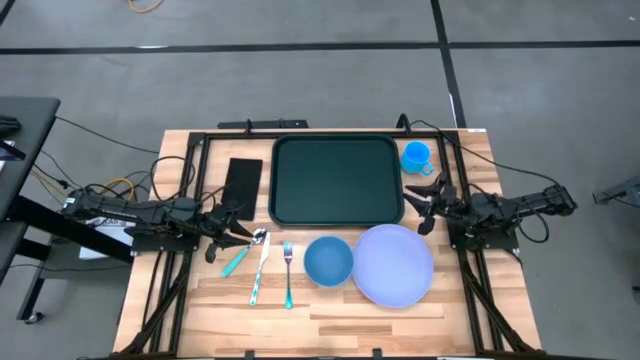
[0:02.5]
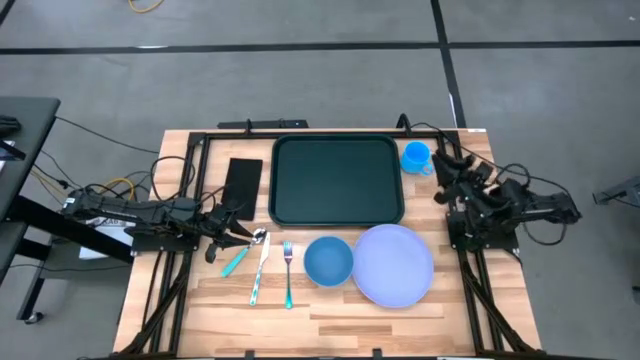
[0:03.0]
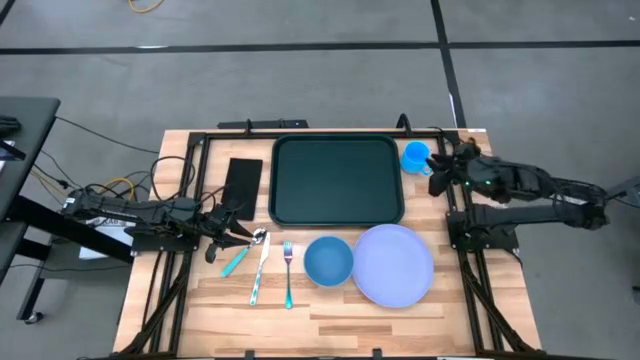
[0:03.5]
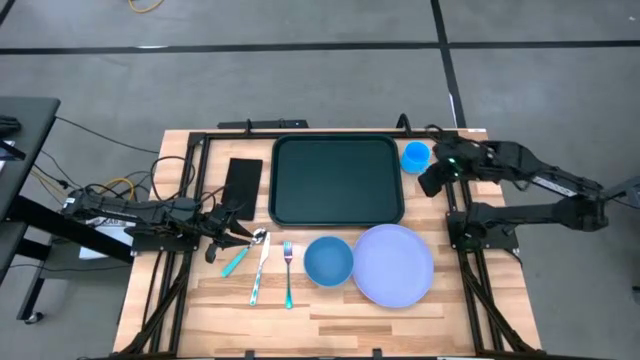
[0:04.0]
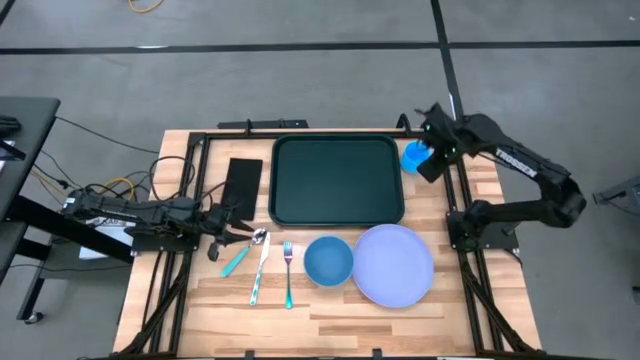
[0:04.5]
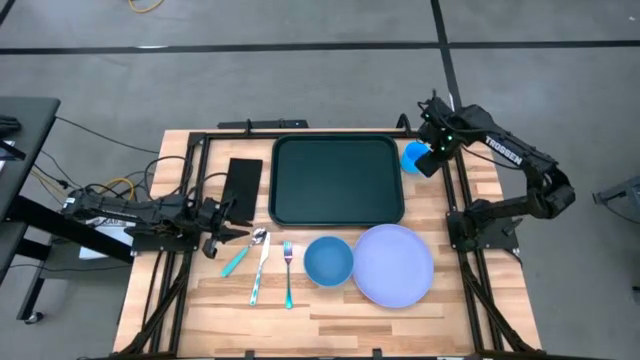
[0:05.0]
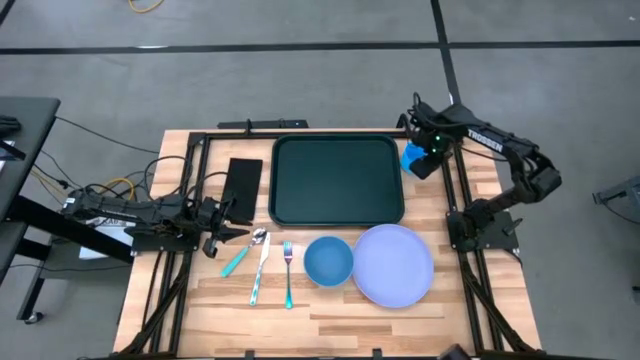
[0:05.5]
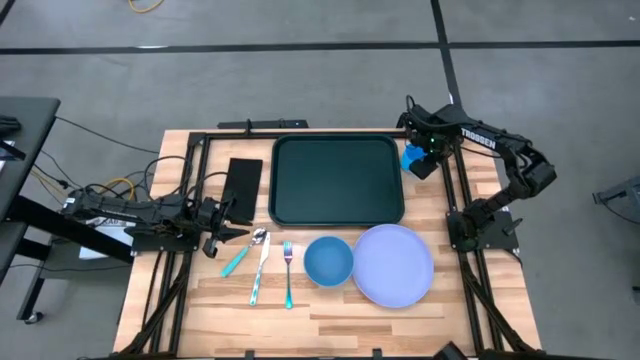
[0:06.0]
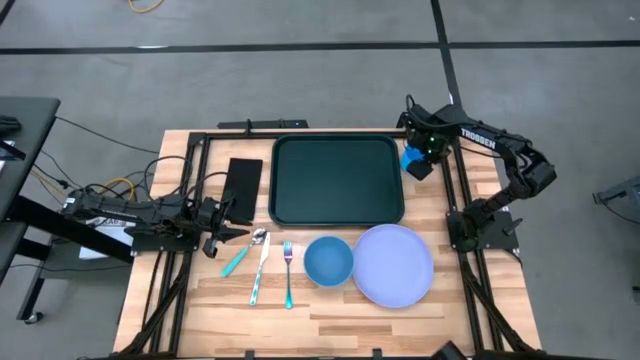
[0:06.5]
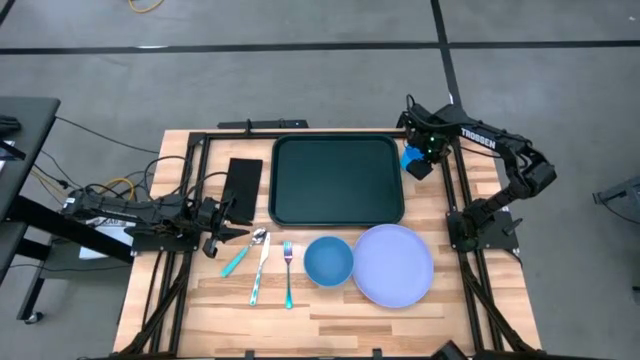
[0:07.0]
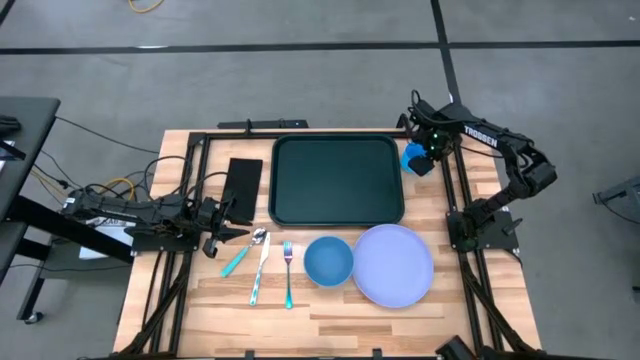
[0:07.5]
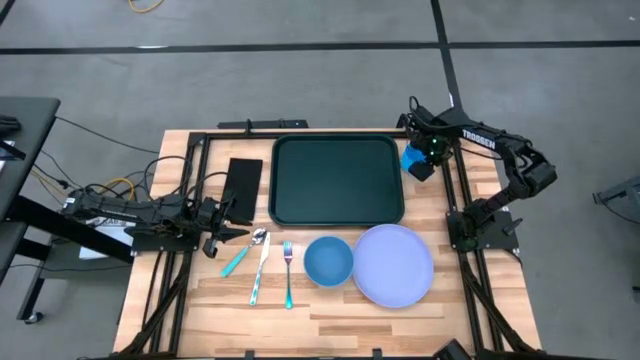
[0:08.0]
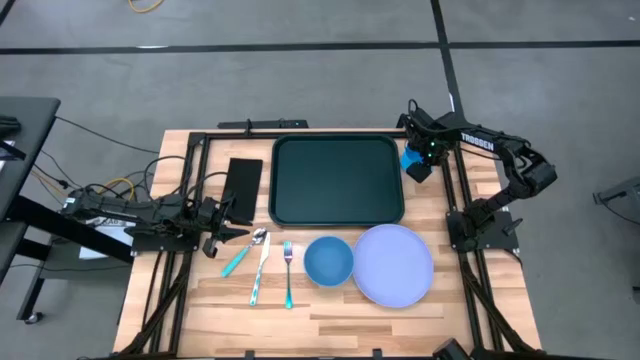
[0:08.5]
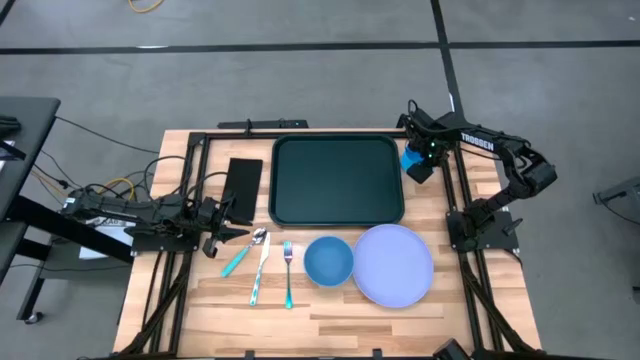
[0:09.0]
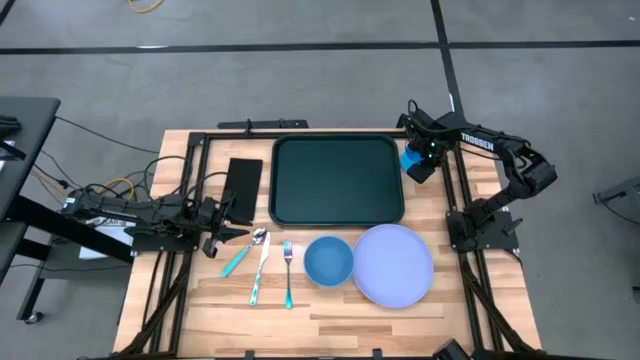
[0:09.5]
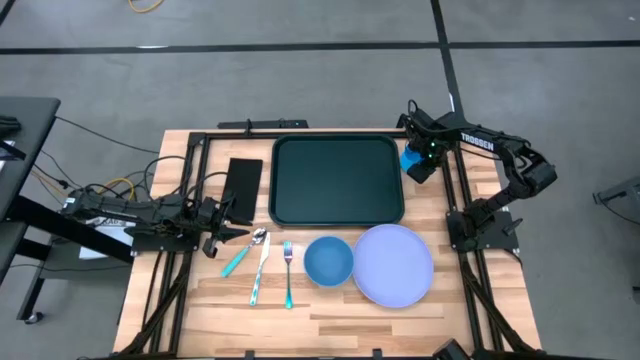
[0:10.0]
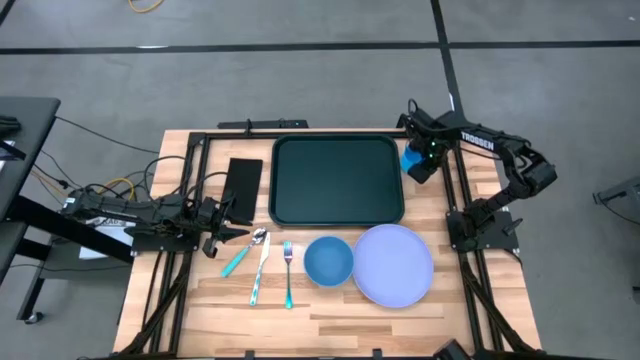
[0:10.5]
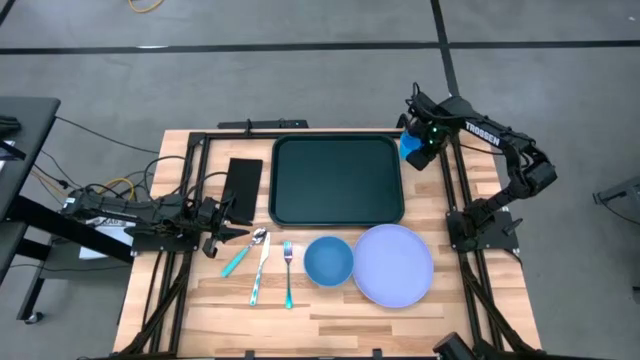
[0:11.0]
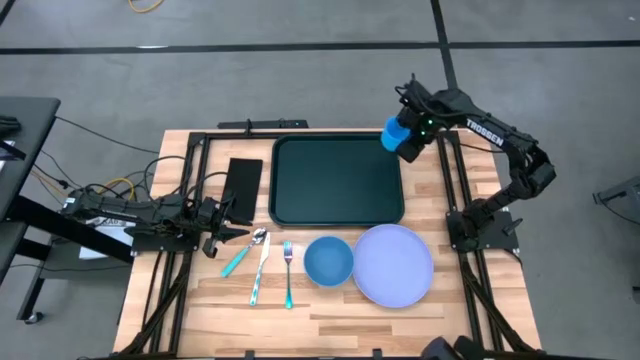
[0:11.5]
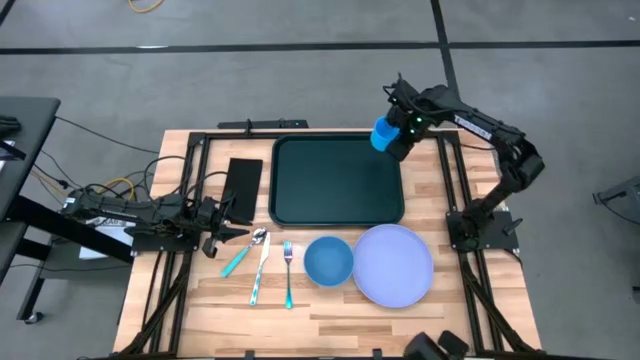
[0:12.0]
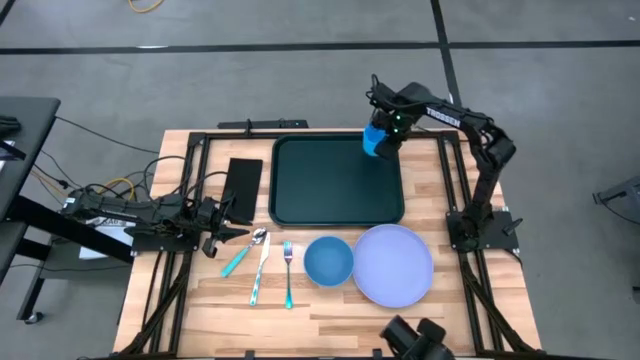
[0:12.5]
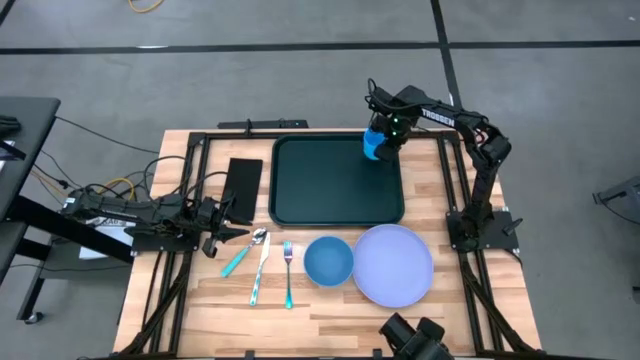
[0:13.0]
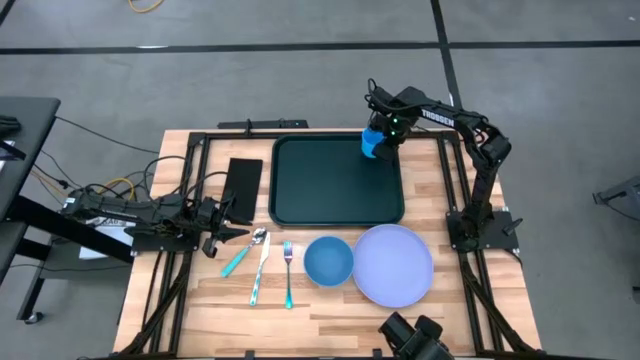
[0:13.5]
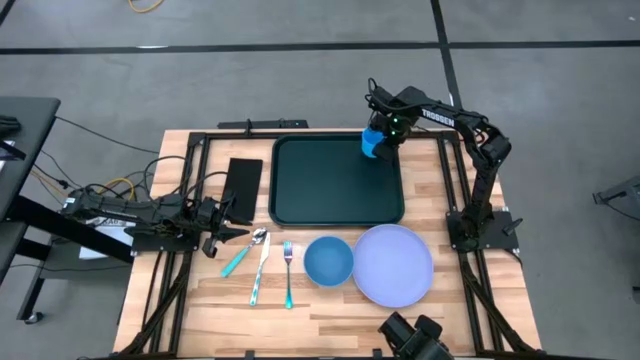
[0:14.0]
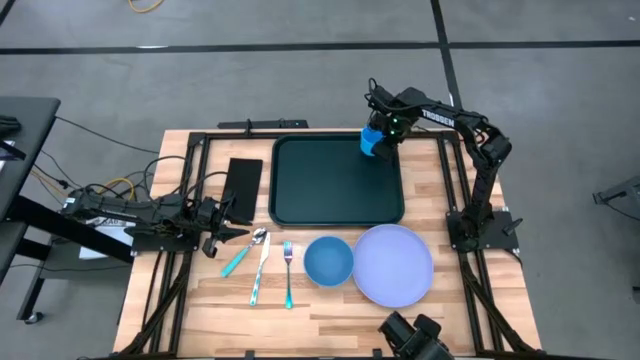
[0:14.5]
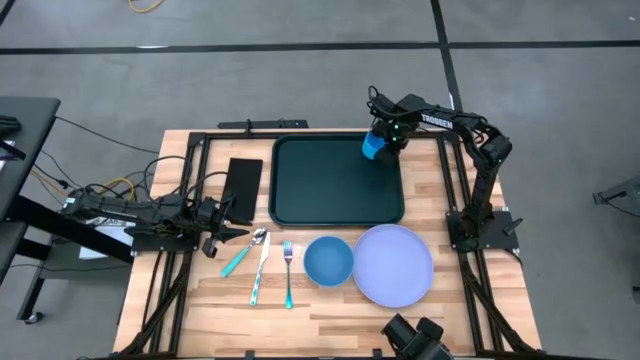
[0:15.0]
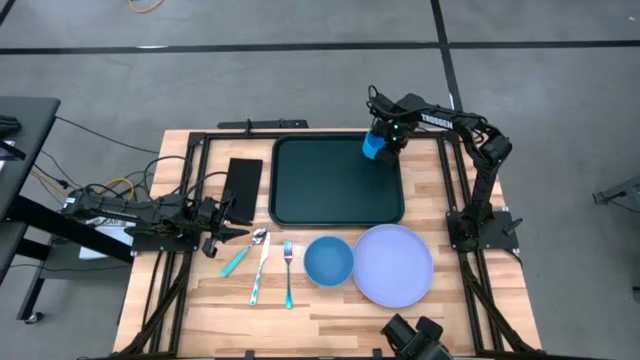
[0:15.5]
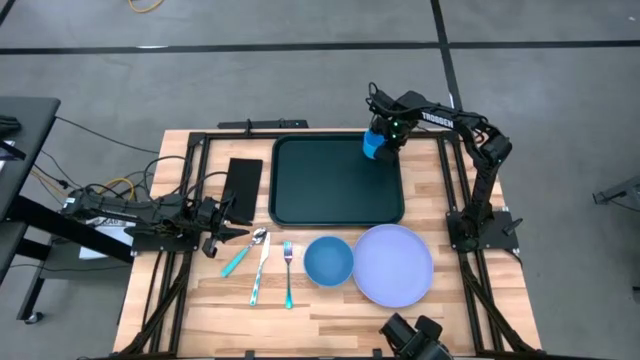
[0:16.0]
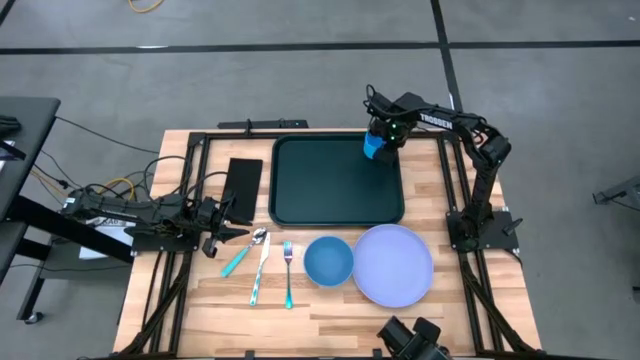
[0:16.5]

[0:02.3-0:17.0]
Task: Set up tray
Put the light blue mug on the top right of the black serving tray

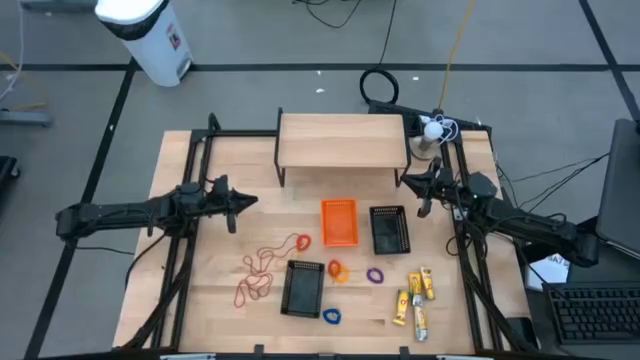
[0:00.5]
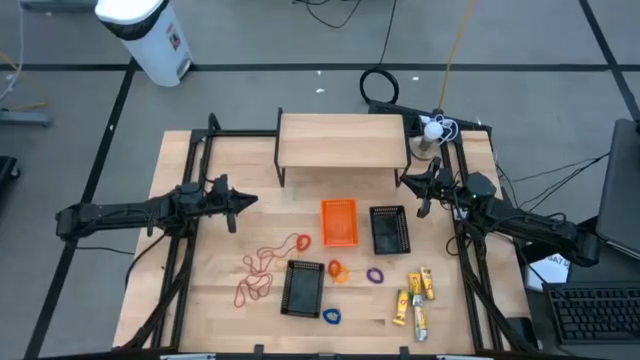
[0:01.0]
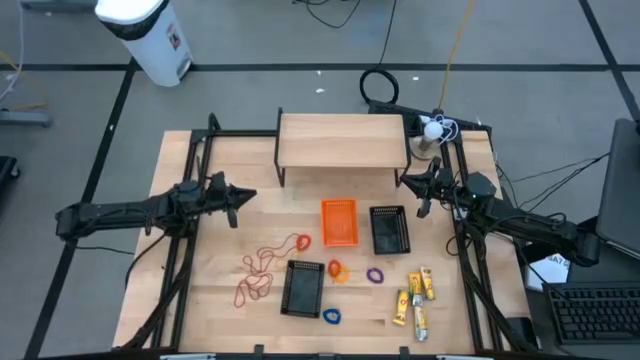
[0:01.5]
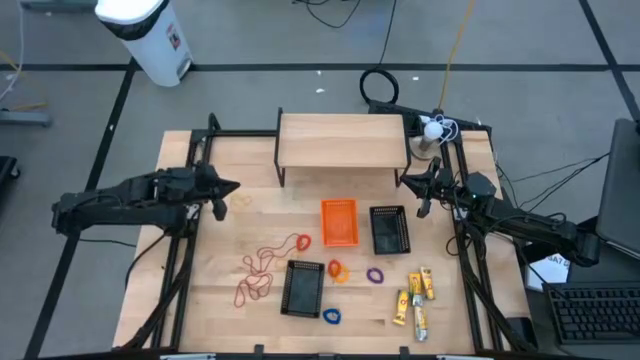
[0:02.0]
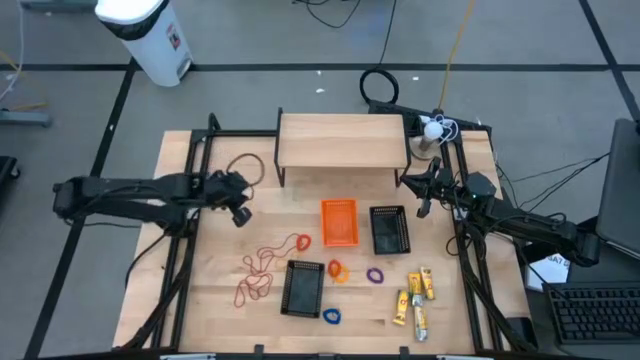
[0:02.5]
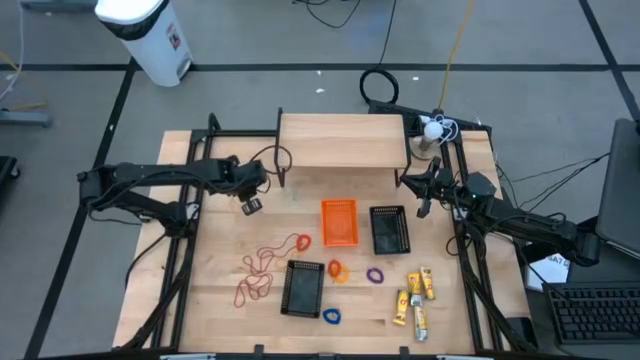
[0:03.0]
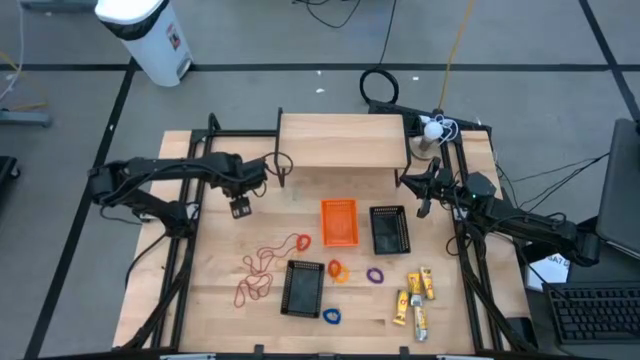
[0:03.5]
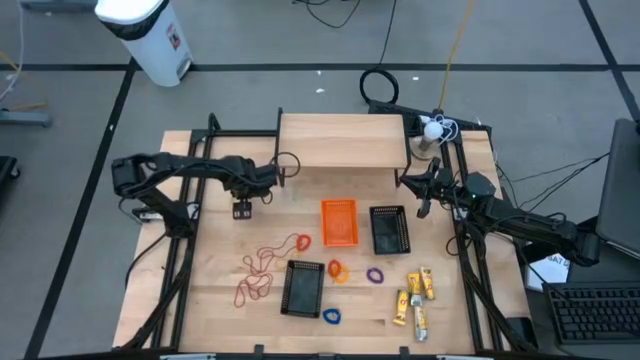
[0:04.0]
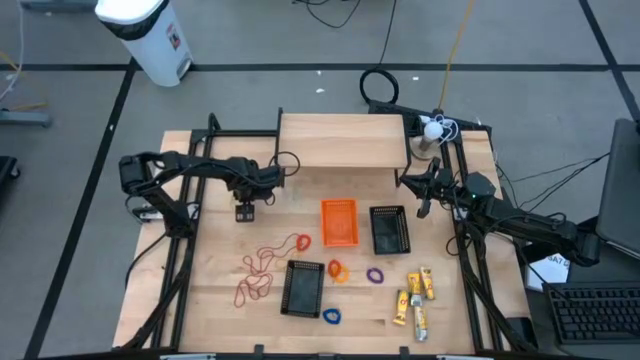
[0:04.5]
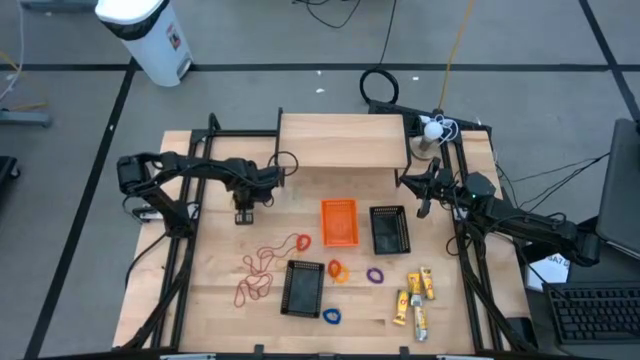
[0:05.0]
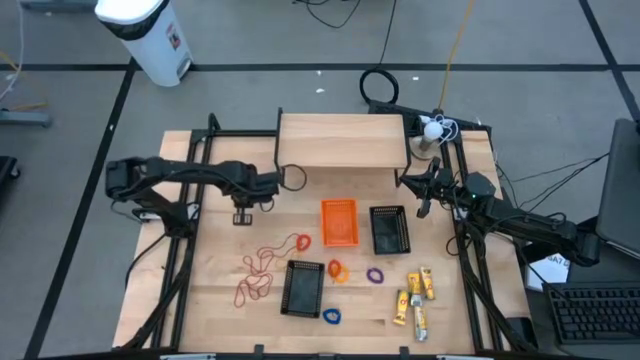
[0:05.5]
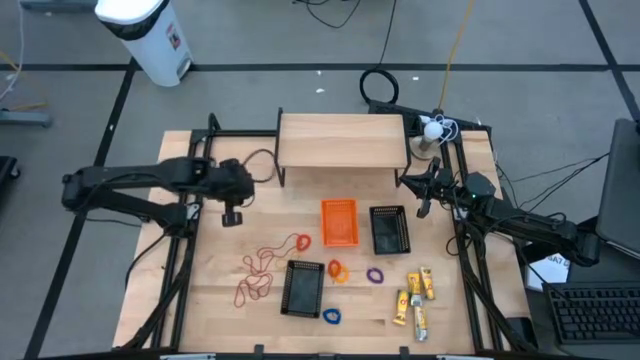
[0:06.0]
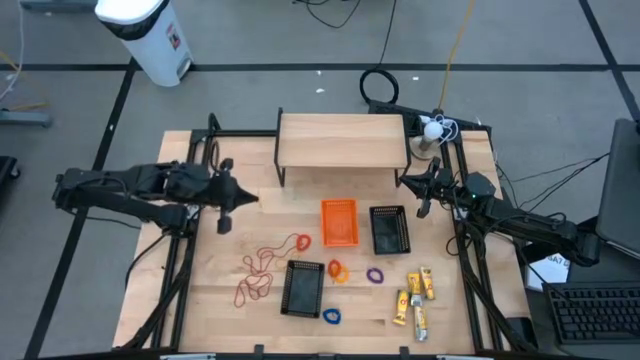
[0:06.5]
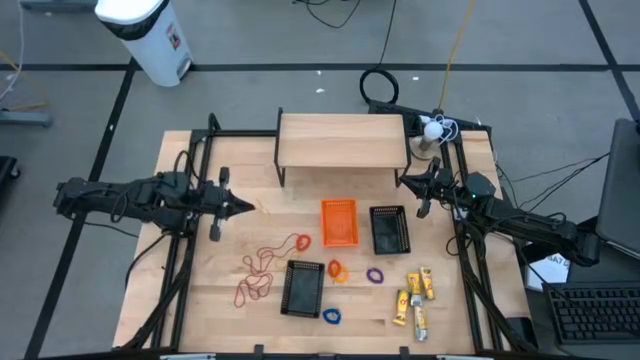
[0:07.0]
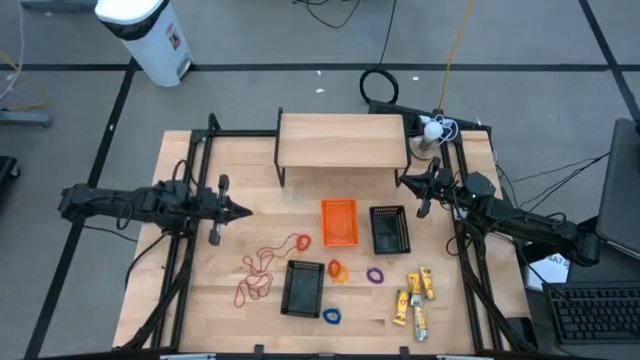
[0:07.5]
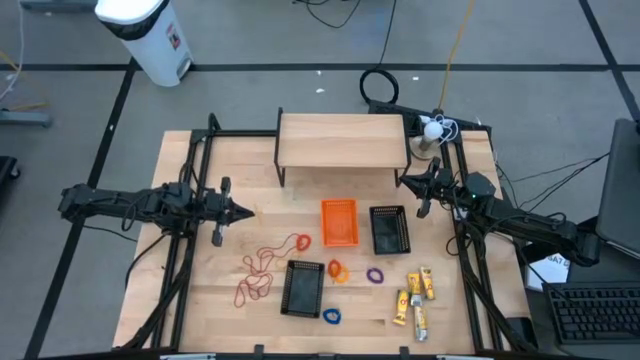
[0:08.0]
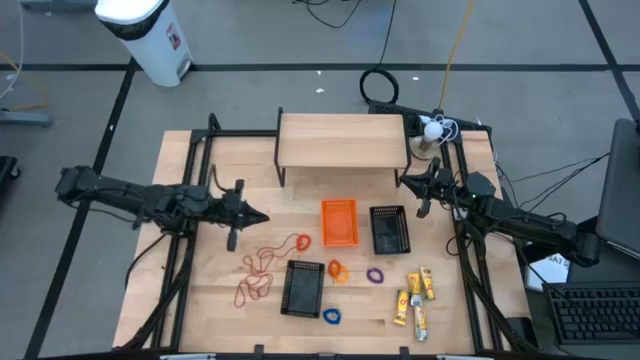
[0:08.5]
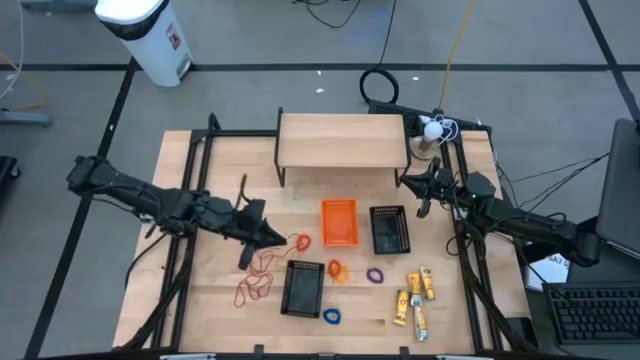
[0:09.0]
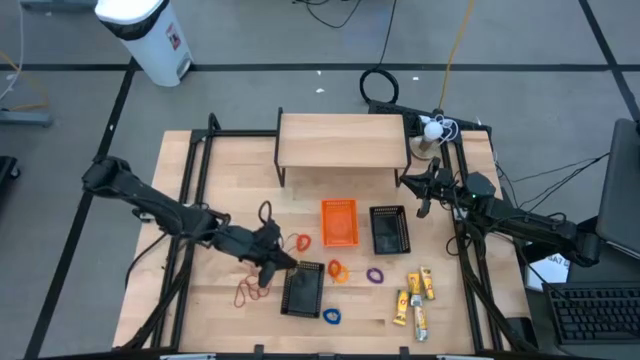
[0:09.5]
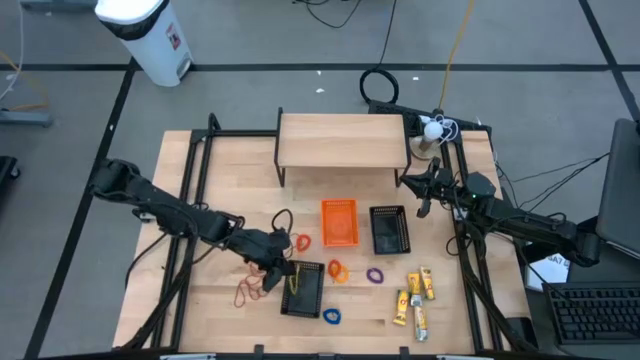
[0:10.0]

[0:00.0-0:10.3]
Task: Pick & Place Office Desk Supplies
Put the yellow rubber band into the bottom black bin
